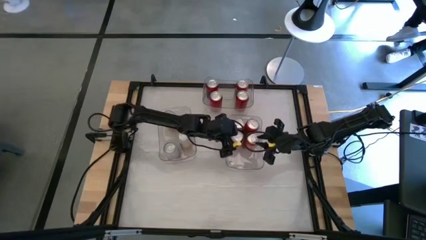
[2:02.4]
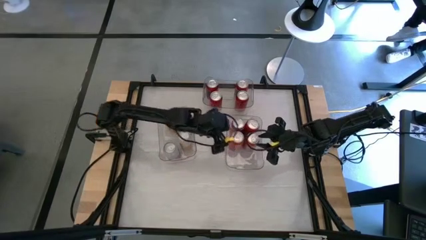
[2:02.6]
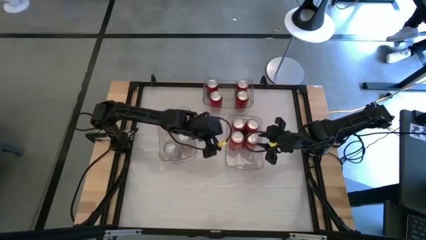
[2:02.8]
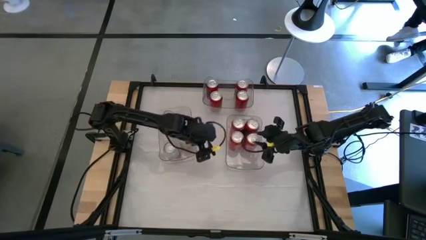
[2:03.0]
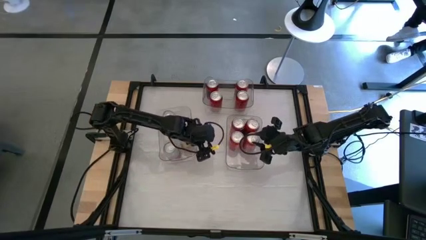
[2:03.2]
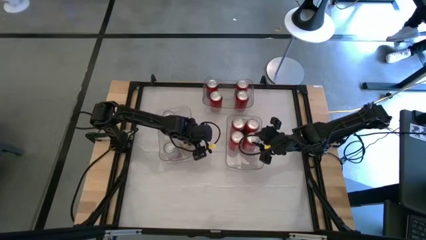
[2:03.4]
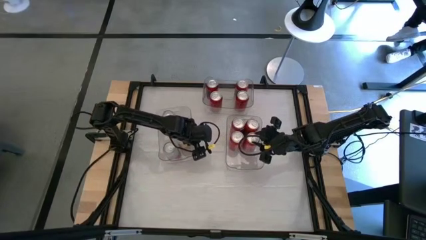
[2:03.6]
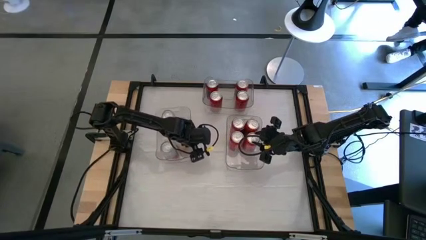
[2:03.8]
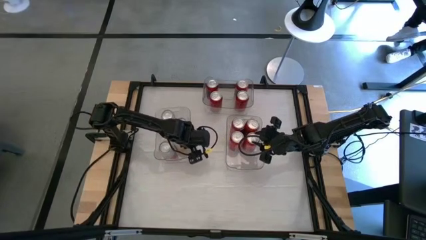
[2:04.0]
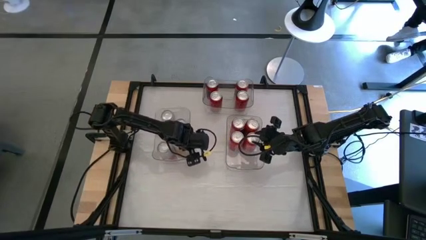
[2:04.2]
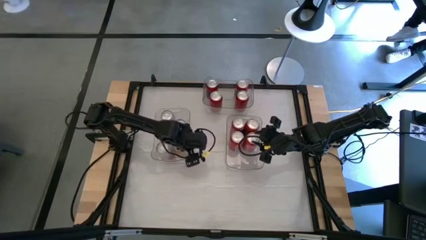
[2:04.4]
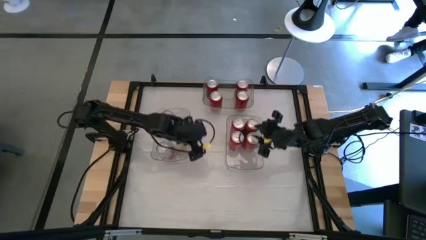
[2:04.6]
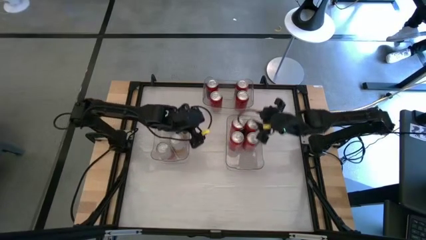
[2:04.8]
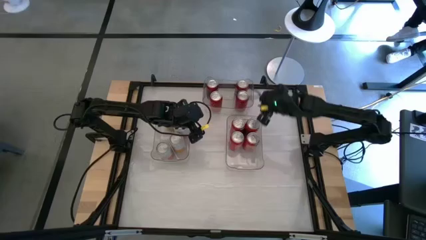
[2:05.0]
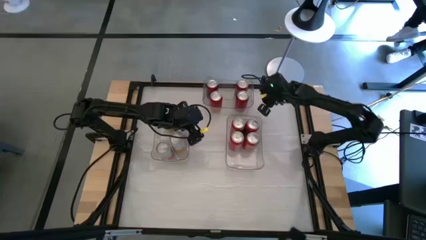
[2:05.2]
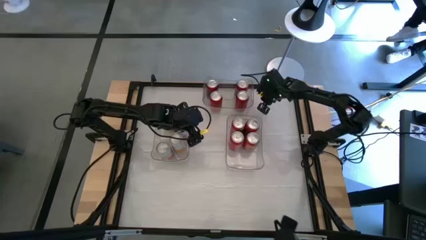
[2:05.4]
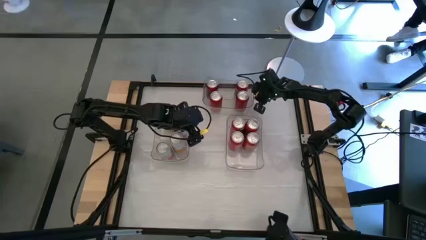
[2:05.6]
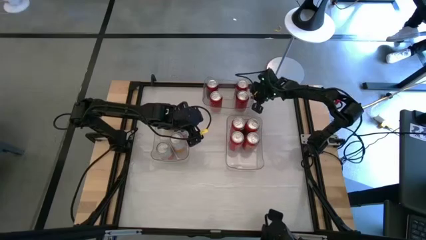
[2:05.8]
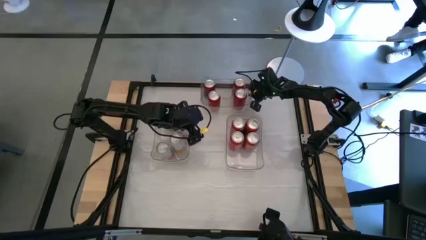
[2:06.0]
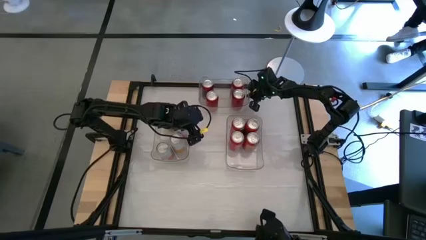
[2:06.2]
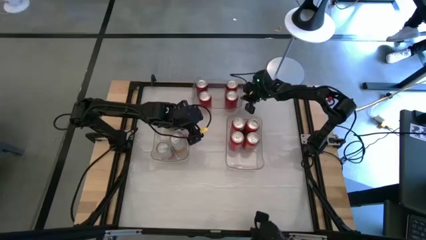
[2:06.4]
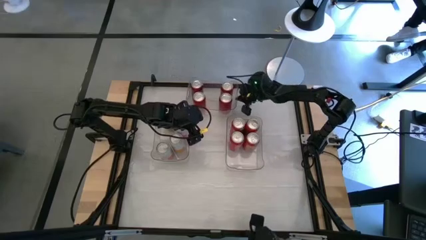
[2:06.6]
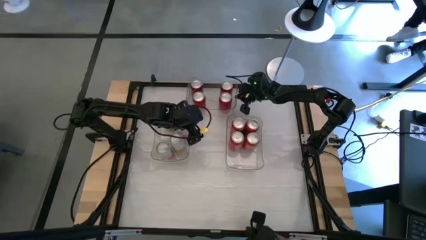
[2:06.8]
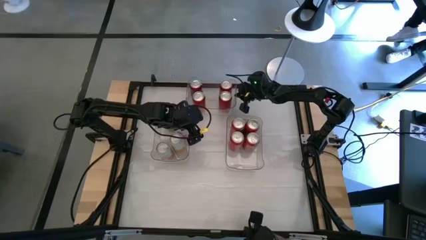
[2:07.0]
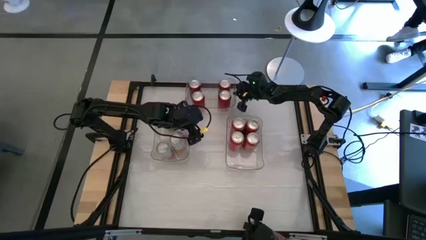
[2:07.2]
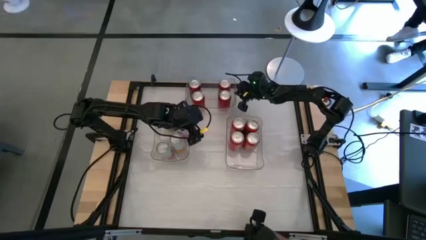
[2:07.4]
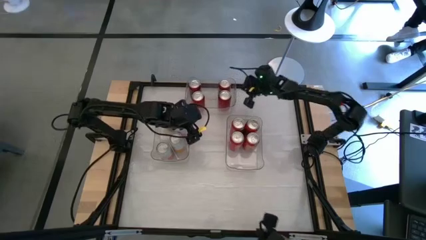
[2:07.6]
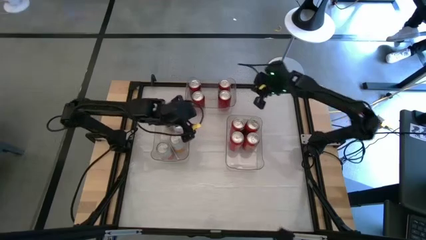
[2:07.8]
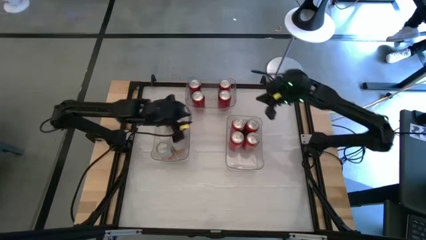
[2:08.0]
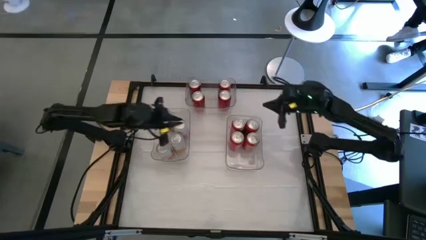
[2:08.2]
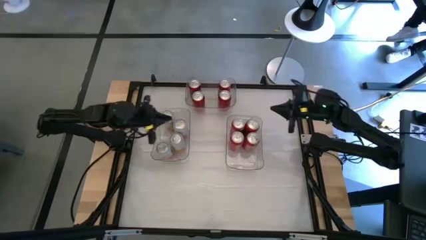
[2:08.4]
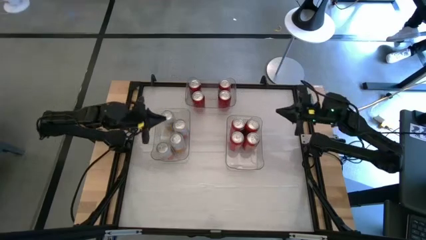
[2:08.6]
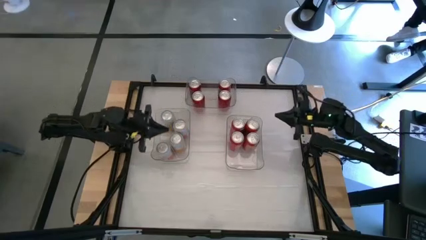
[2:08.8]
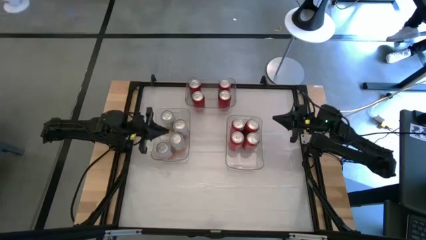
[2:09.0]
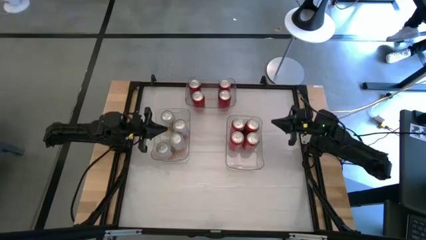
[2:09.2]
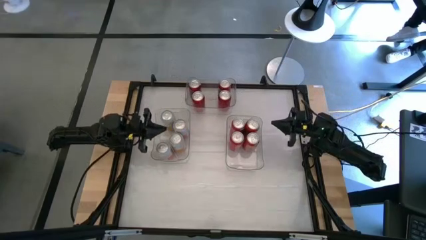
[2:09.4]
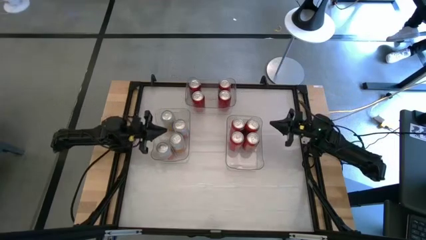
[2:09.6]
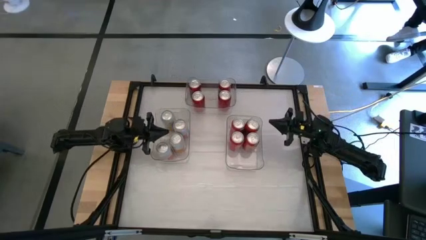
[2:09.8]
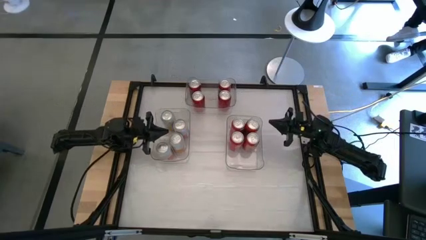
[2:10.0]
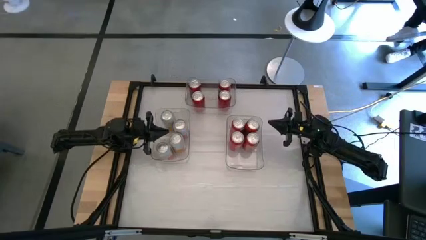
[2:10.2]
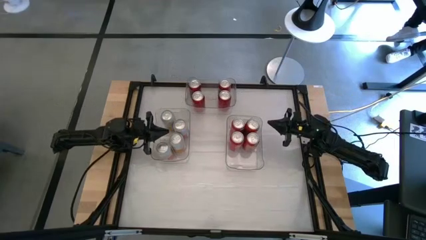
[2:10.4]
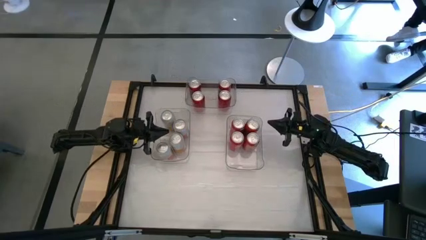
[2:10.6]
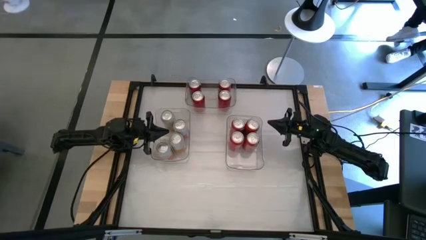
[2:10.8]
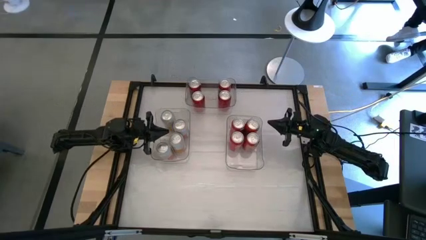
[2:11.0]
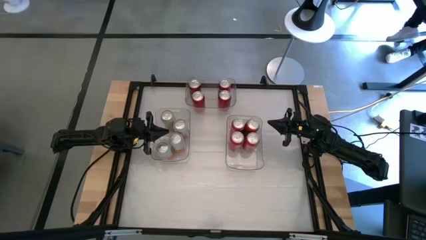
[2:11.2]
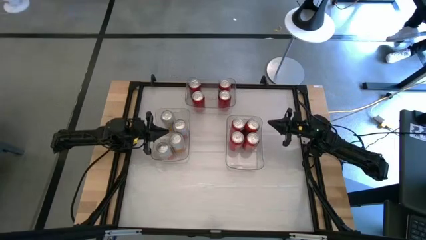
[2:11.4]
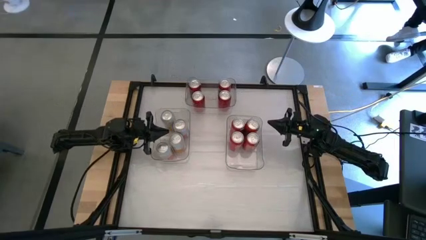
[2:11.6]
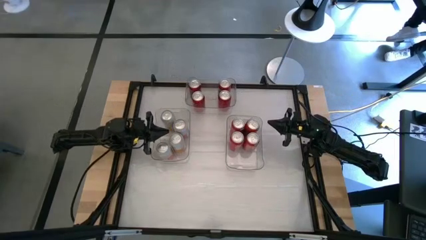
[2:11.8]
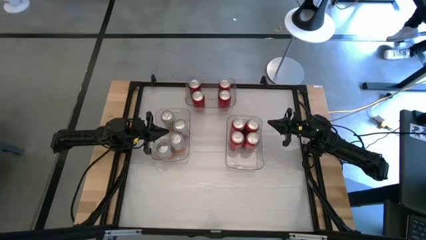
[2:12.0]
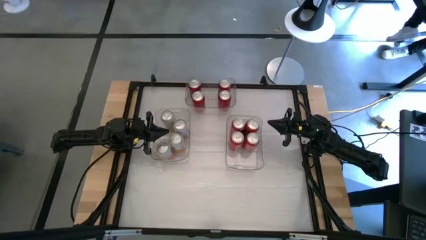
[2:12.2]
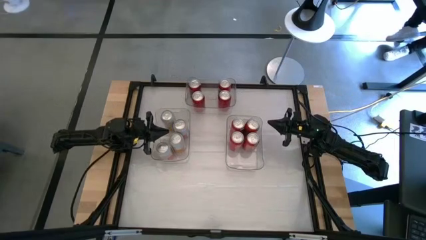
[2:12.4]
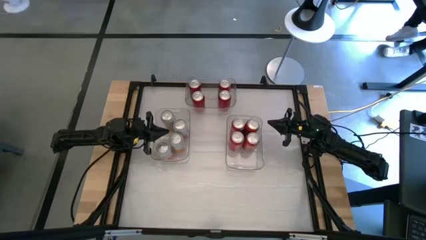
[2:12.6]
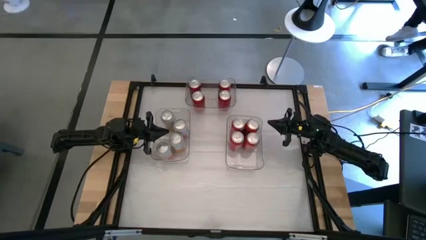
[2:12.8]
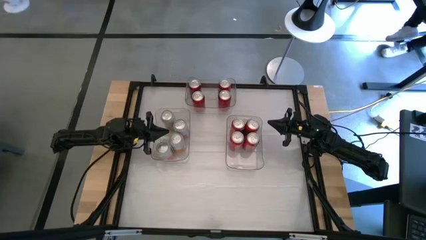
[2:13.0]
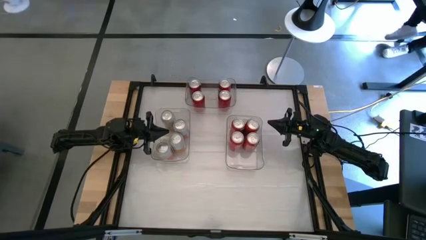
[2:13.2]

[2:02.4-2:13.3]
Task: Sort soda cans
Return to Home Position

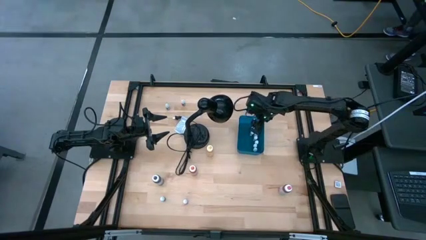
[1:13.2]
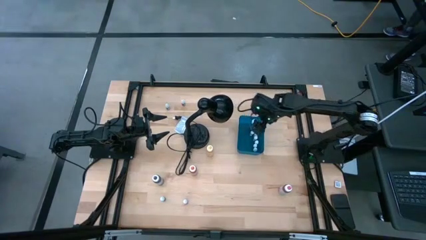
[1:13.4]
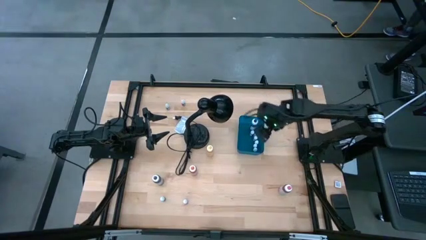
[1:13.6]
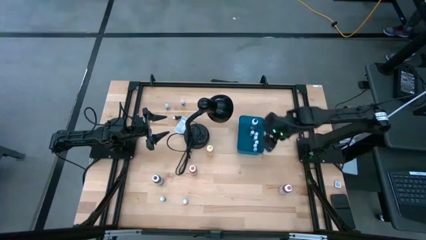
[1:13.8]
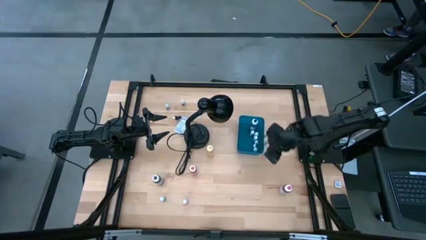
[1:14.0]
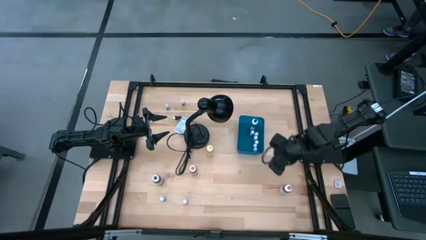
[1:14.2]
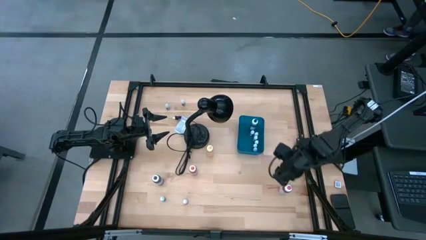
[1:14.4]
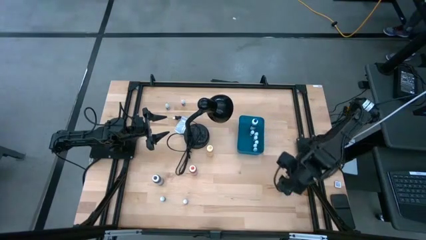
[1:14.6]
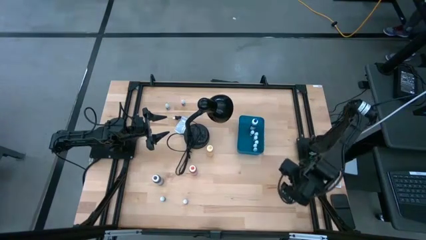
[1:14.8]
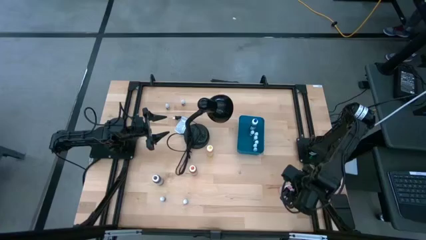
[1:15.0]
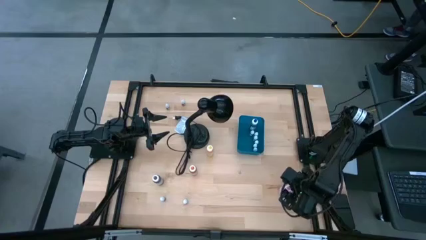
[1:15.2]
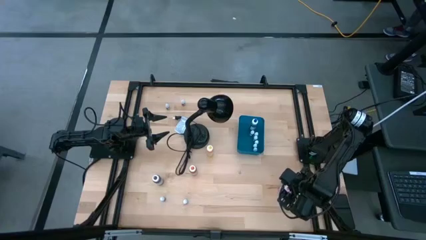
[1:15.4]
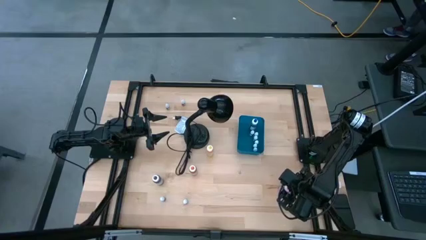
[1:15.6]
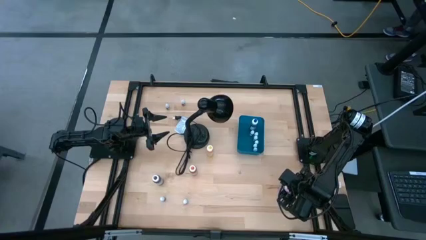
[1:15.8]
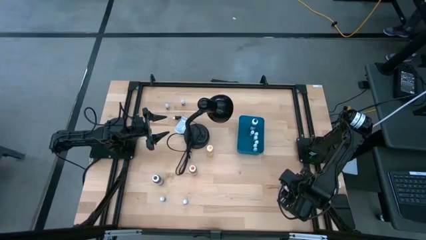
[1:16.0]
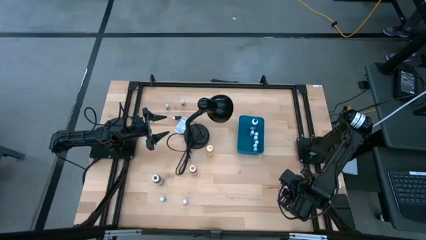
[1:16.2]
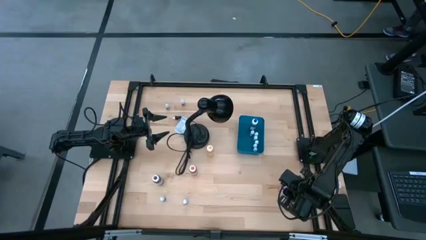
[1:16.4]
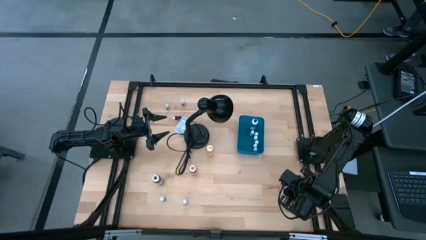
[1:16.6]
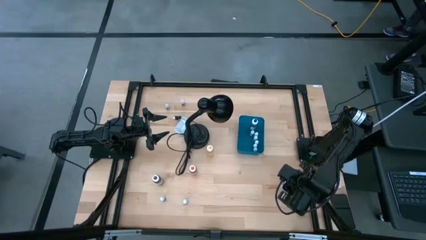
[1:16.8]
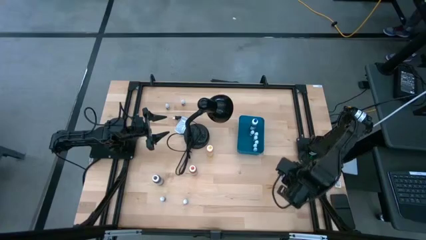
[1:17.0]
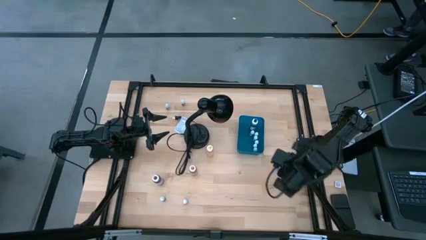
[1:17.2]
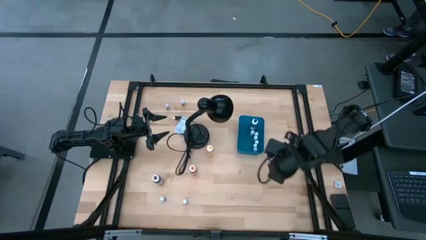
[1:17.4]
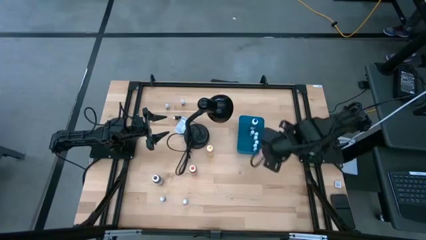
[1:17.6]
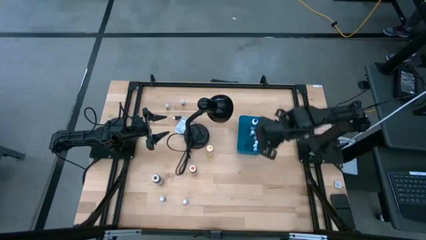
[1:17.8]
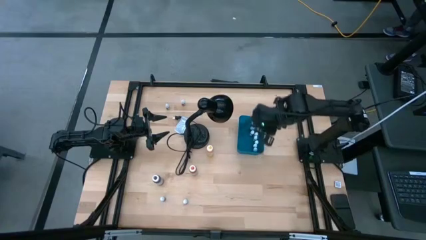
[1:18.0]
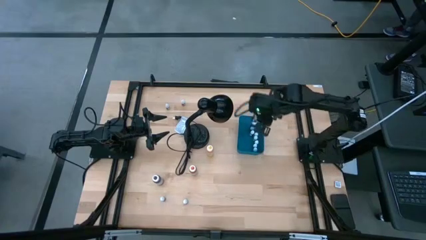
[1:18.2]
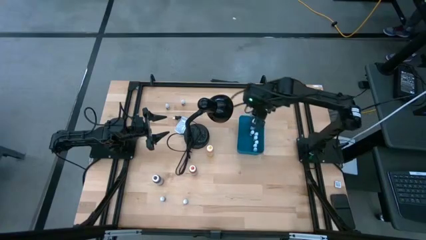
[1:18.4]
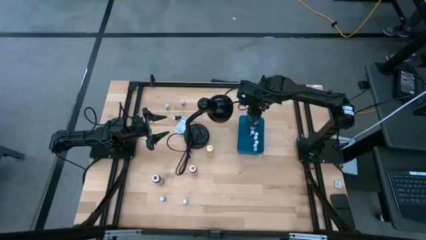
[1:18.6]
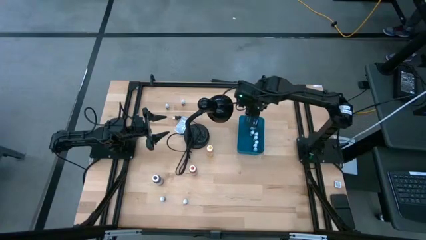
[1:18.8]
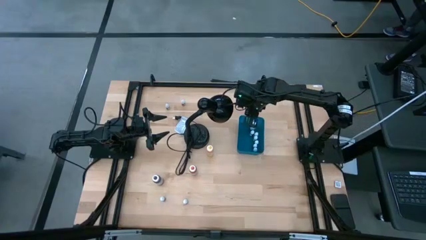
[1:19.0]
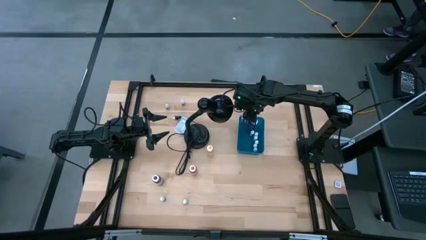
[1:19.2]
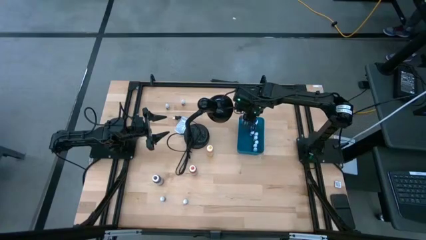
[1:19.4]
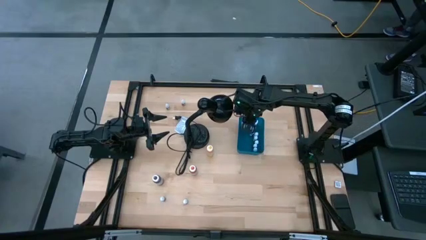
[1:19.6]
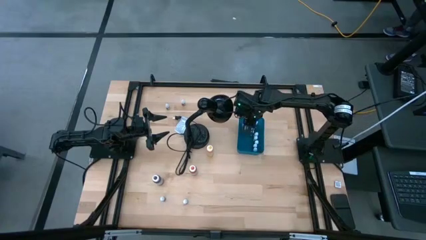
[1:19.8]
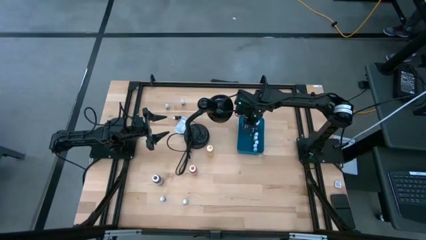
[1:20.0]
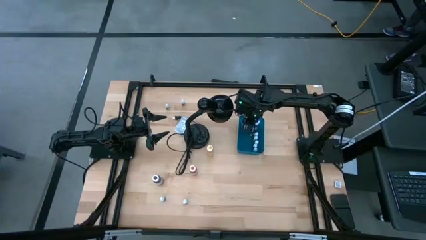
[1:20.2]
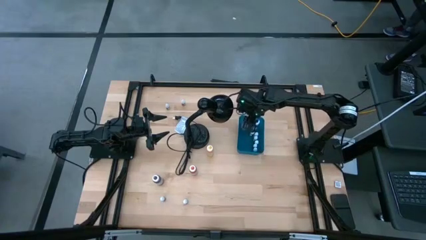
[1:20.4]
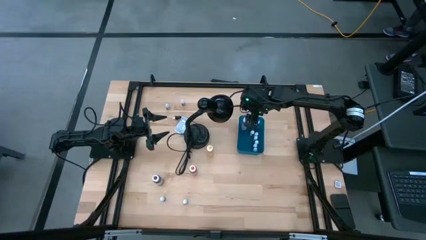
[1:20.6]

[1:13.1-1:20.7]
Task: Pick & Place food coloring
Put the large pink food coloring bottle into the blue bin
